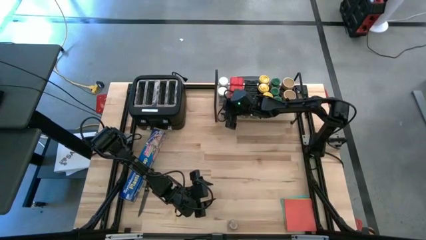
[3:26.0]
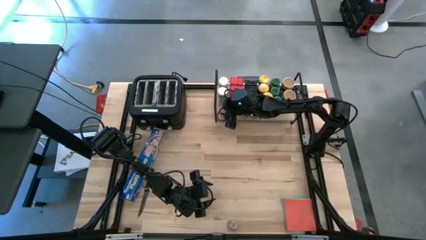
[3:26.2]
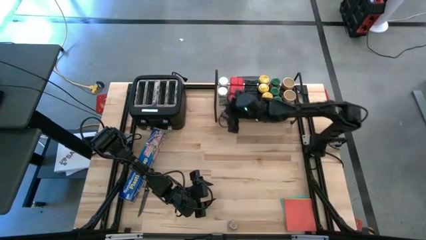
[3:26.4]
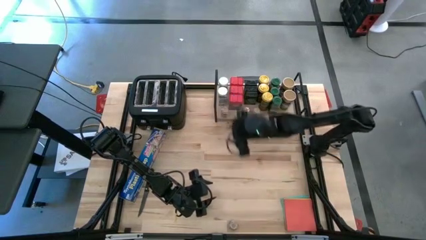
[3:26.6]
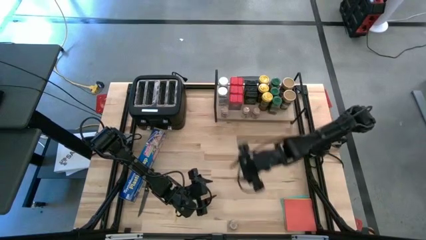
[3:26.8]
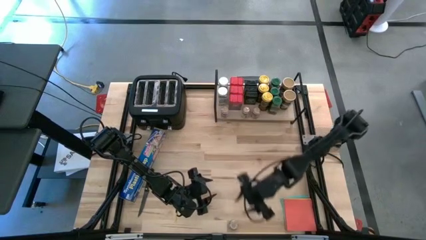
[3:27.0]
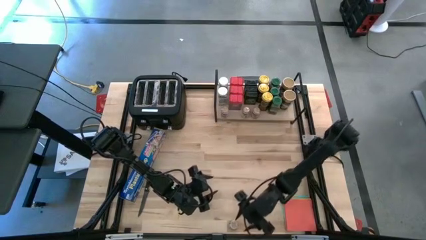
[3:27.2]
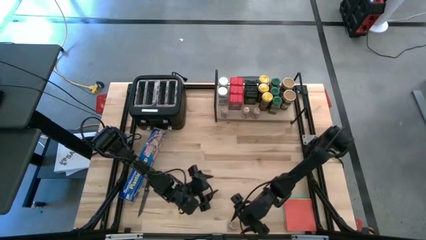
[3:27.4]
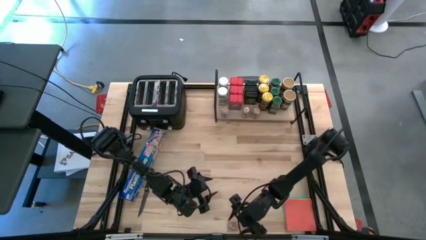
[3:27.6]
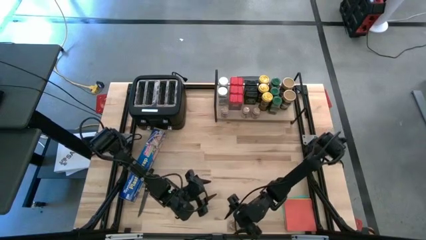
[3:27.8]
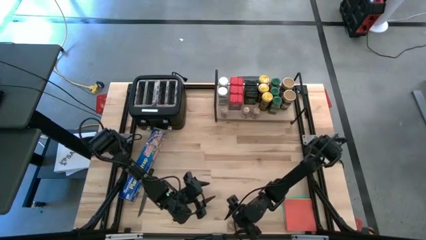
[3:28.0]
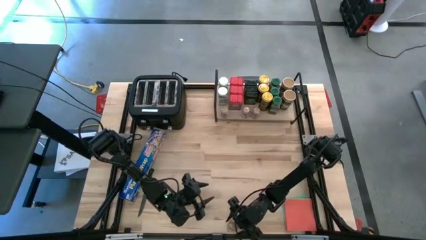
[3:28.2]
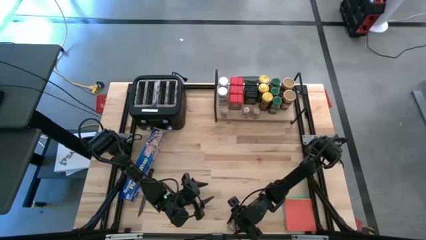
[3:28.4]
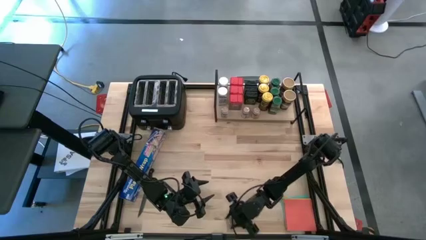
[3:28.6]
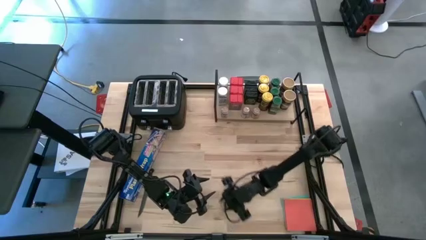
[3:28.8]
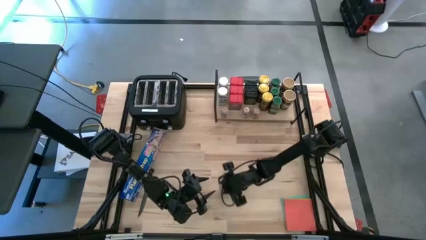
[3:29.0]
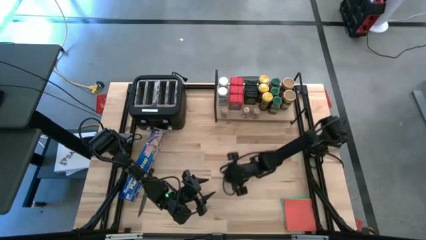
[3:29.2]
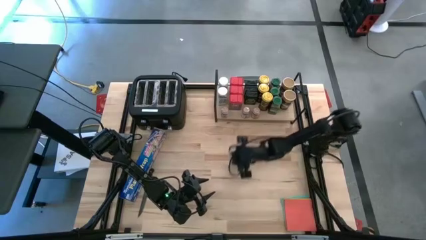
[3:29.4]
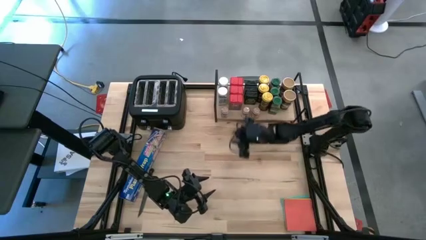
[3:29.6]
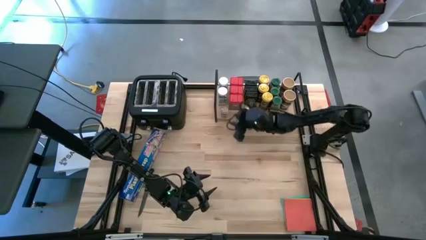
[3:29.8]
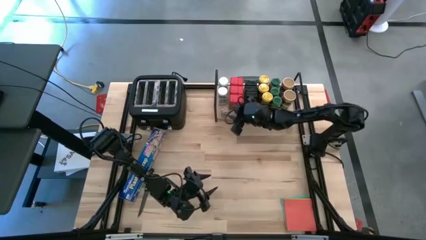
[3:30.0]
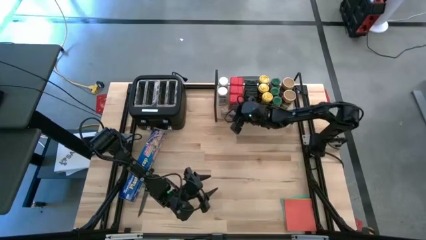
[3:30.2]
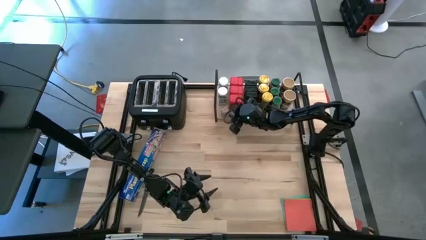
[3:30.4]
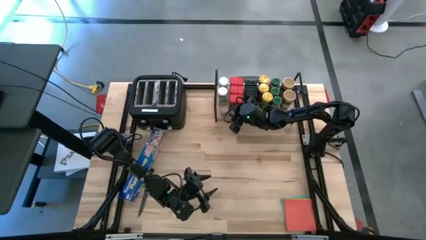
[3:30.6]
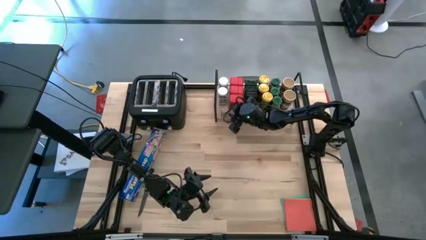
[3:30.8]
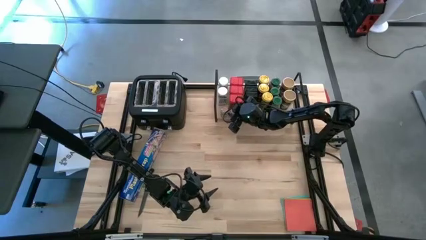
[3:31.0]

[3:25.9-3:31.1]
Task: Shelf spices
Put the small brown seasoning bottle on the shelf aligned with the other small brown seasoning bottle

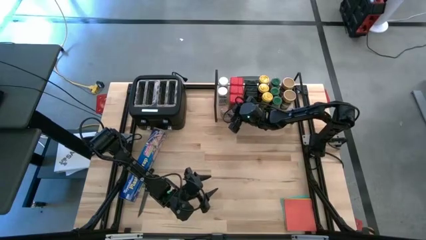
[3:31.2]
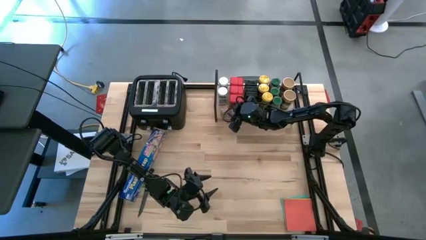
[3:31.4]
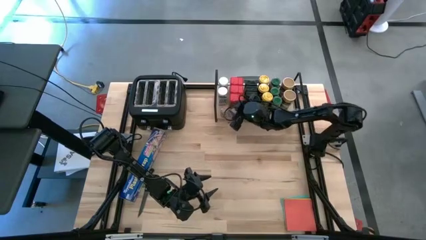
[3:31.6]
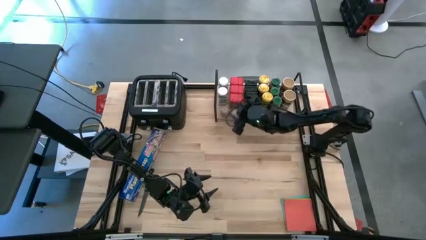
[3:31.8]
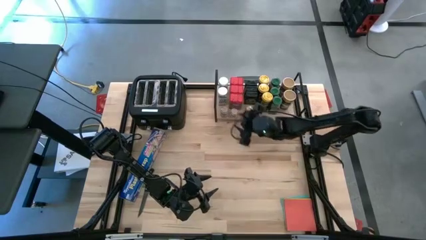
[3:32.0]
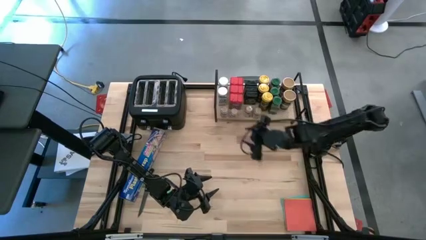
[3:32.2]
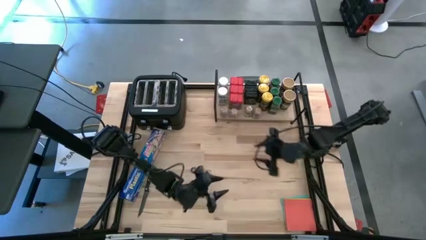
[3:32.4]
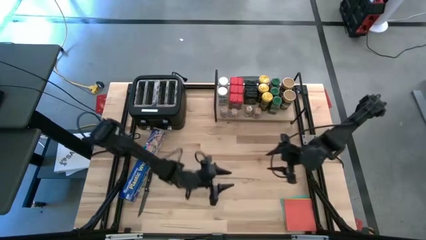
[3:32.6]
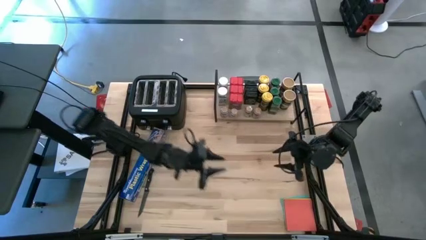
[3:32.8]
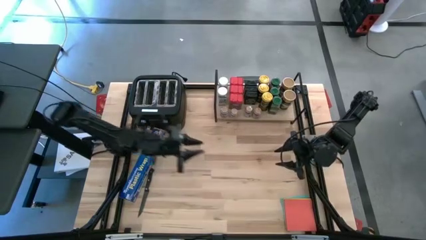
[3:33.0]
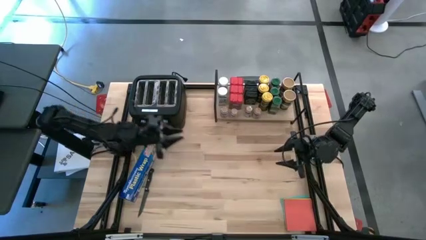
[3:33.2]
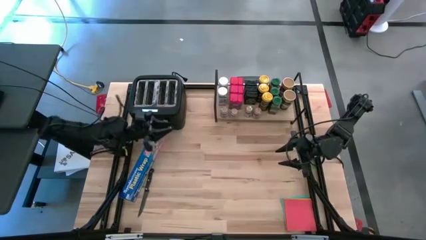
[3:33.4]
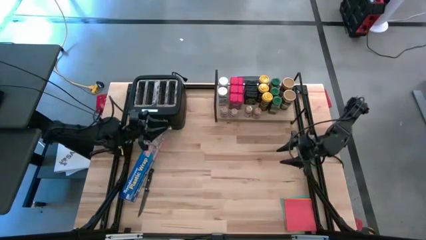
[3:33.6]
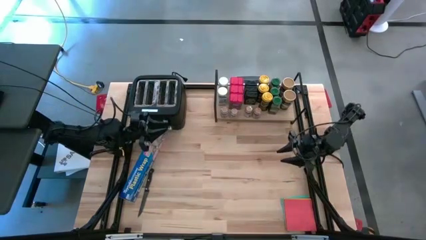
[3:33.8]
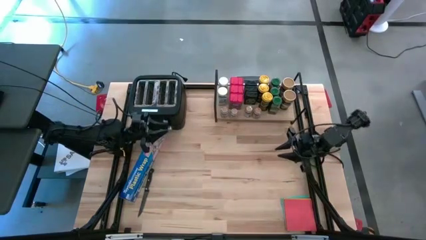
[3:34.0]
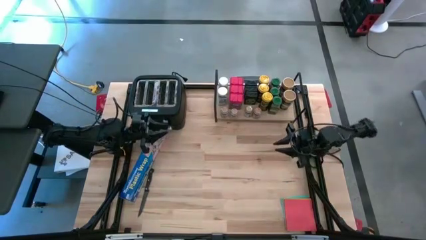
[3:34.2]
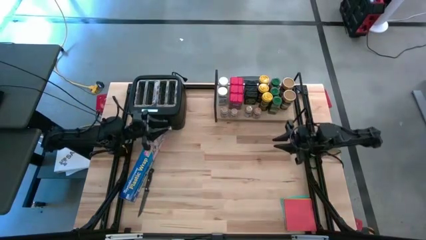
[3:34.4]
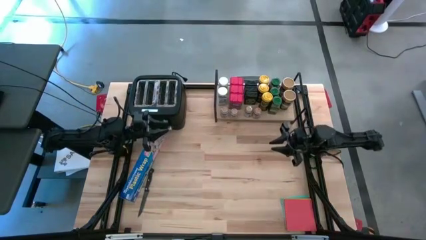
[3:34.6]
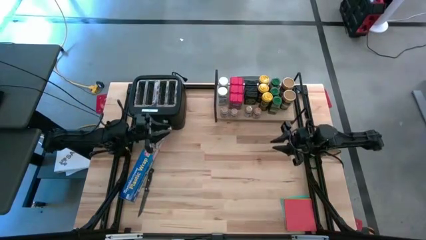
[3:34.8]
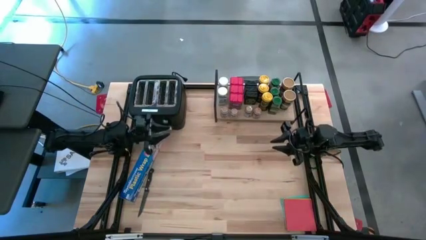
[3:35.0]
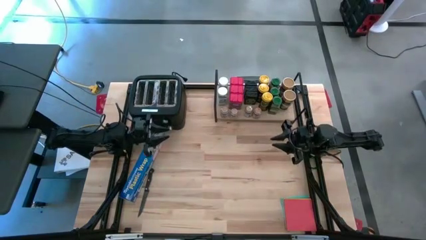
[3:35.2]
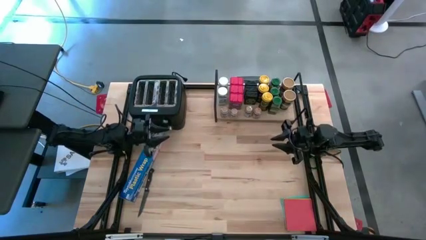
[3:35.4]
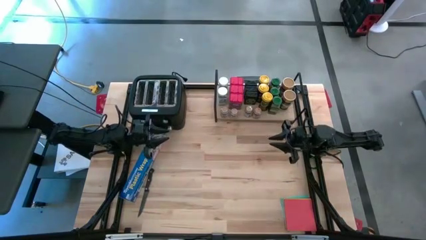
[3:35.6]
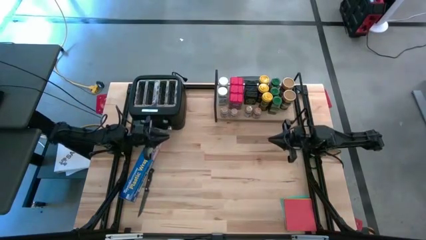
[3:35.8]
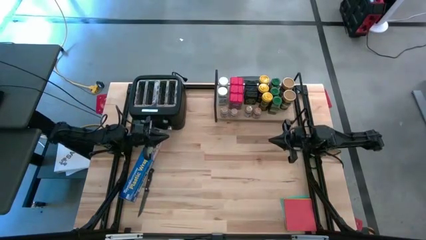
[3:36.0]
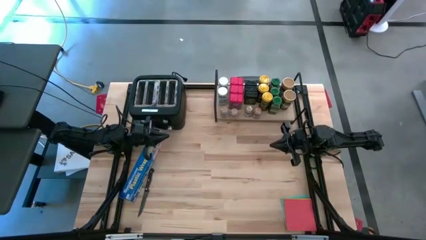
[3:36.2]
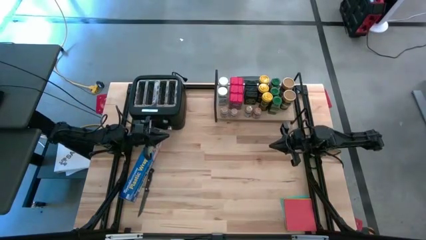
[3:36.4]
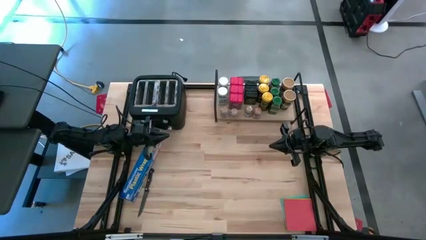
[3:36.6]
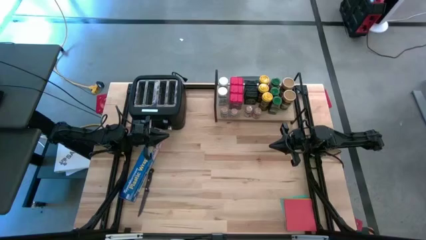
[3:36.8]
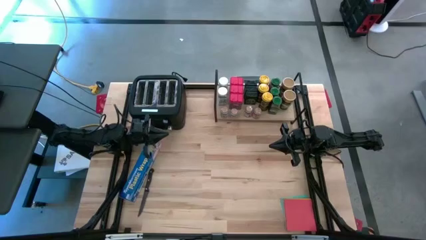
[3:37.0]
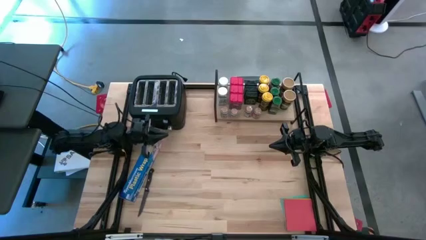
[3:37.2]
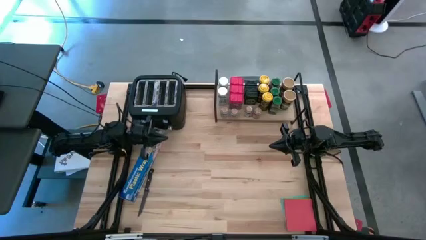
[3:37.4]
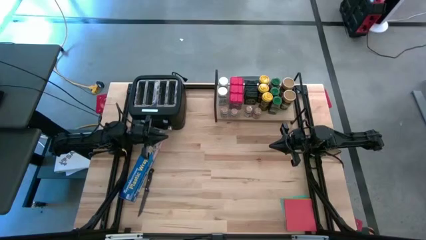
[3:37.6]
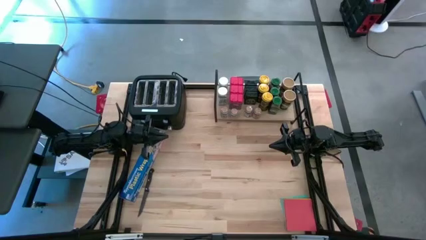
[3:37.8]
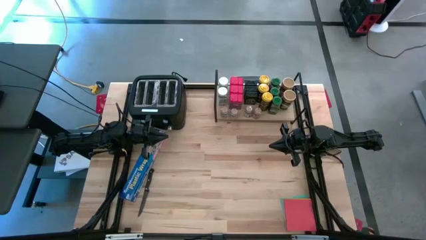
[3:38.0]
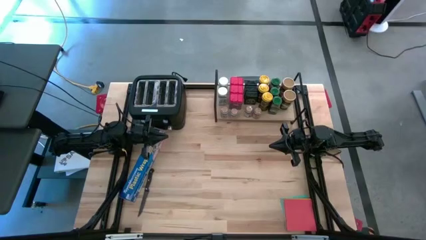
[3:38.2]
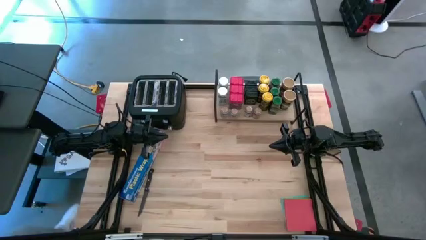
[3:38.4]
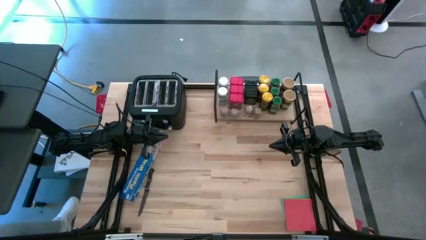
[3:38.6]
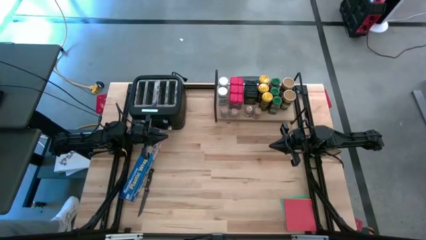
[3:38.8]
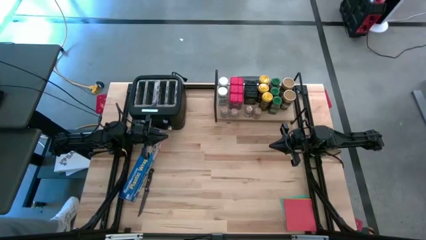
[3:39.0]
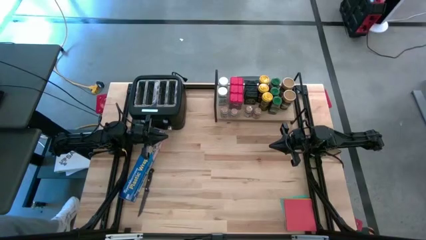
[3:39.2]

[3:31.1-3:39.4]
Return to Home Position
